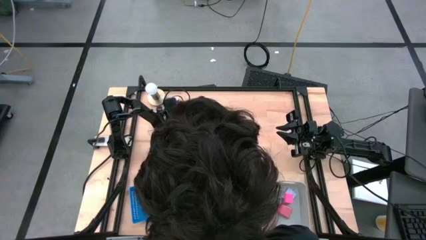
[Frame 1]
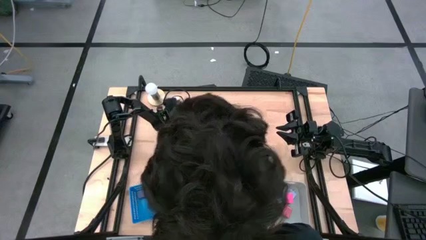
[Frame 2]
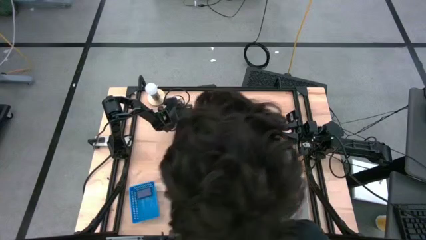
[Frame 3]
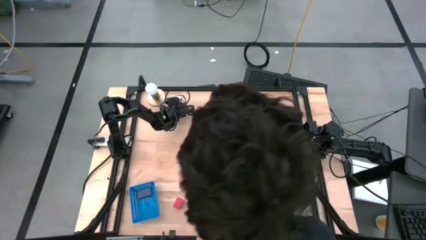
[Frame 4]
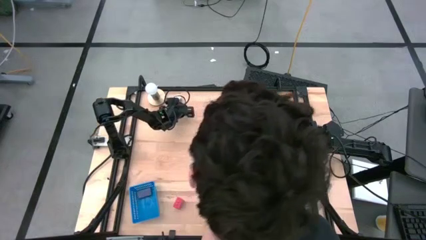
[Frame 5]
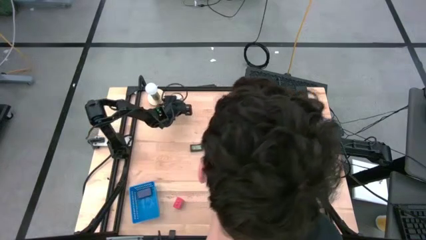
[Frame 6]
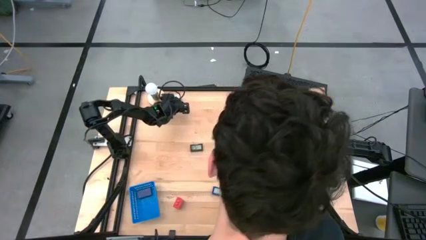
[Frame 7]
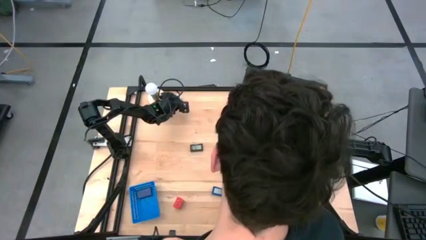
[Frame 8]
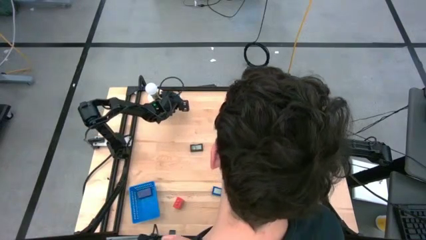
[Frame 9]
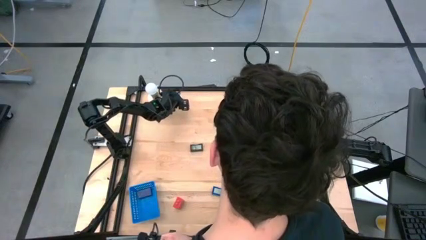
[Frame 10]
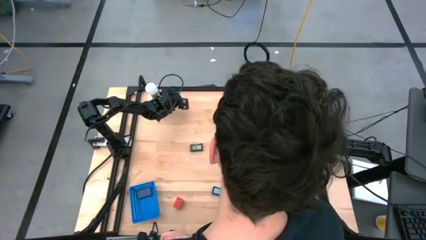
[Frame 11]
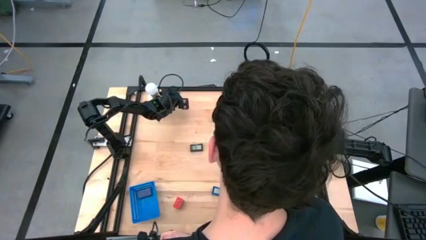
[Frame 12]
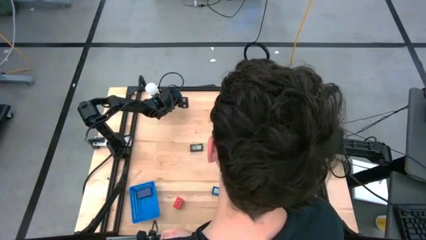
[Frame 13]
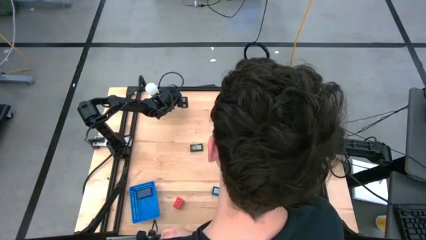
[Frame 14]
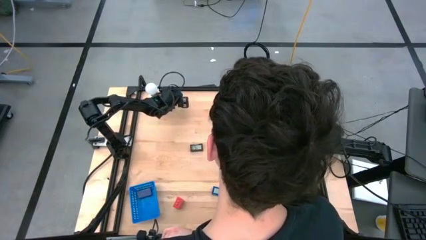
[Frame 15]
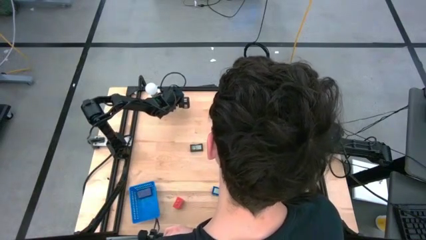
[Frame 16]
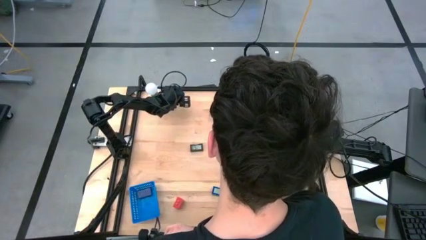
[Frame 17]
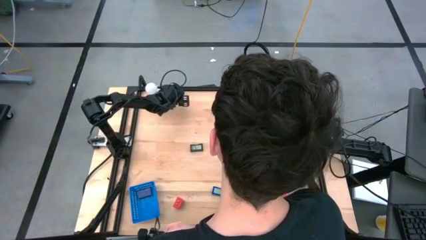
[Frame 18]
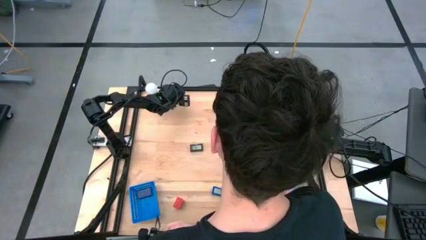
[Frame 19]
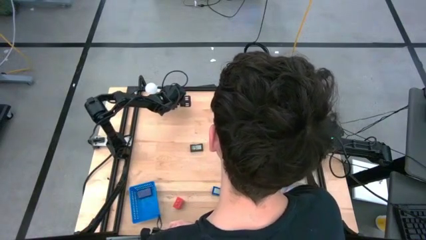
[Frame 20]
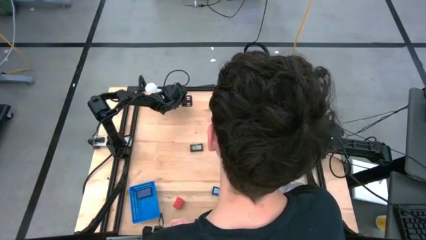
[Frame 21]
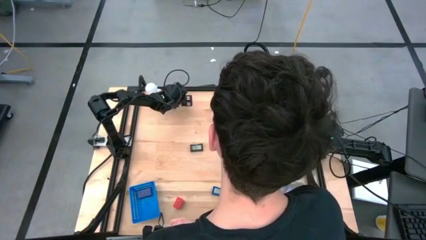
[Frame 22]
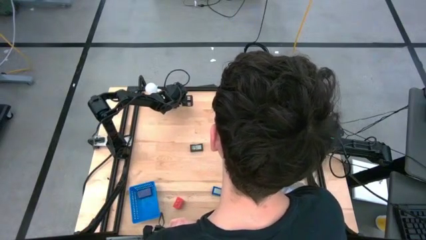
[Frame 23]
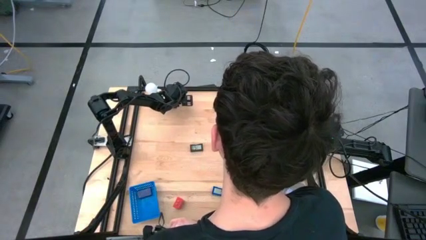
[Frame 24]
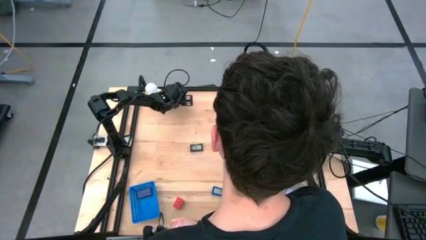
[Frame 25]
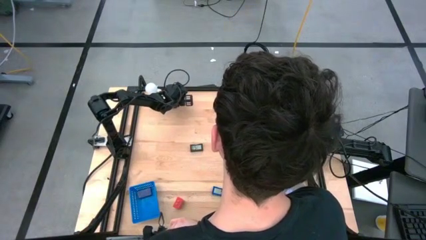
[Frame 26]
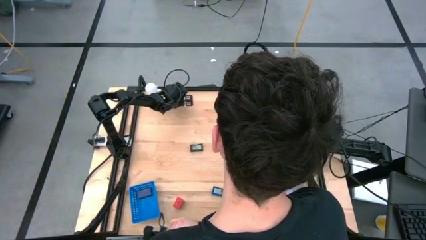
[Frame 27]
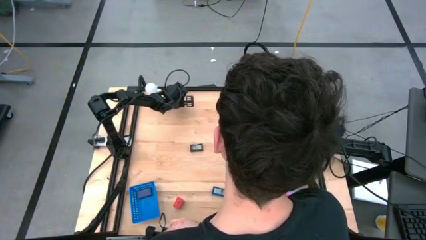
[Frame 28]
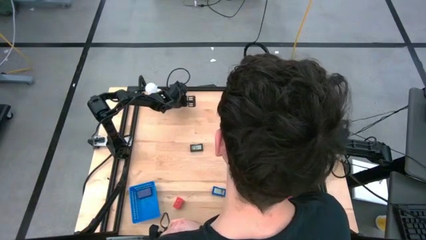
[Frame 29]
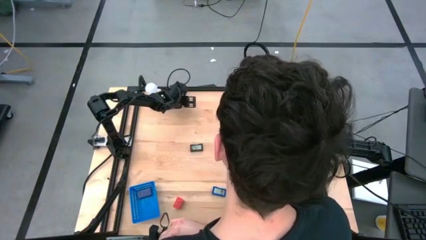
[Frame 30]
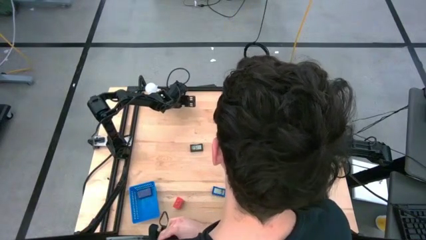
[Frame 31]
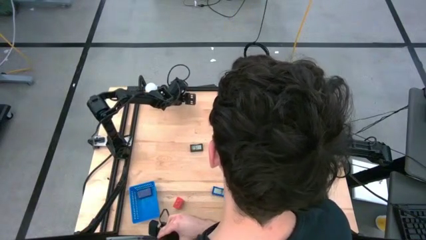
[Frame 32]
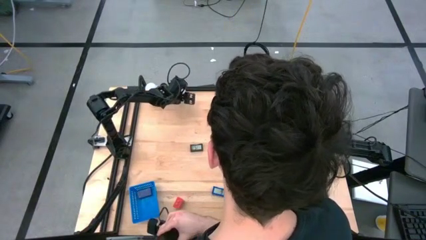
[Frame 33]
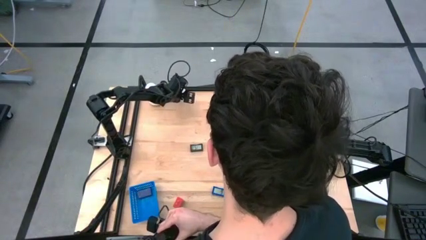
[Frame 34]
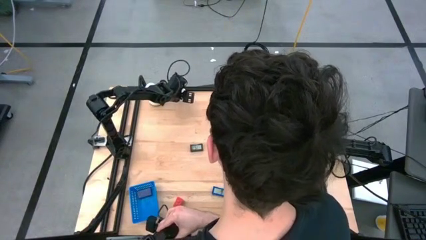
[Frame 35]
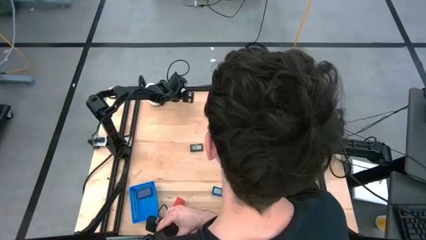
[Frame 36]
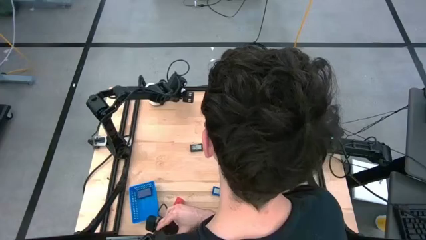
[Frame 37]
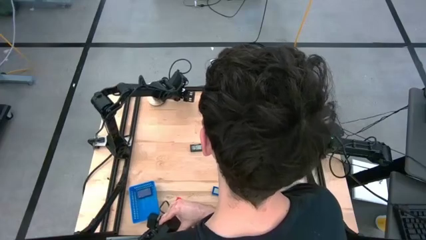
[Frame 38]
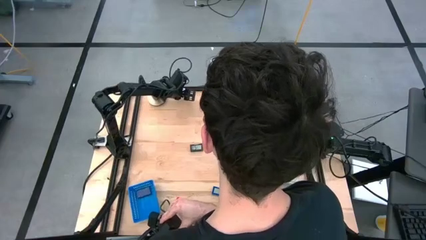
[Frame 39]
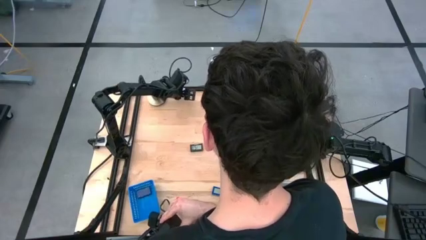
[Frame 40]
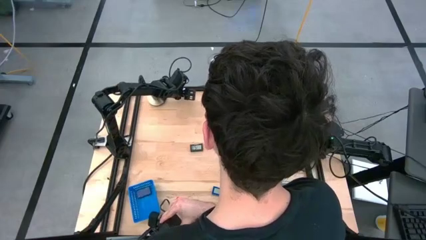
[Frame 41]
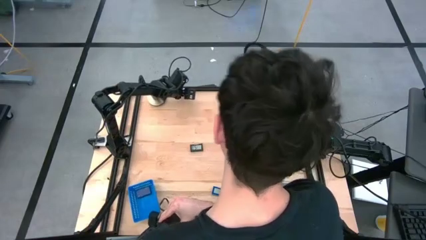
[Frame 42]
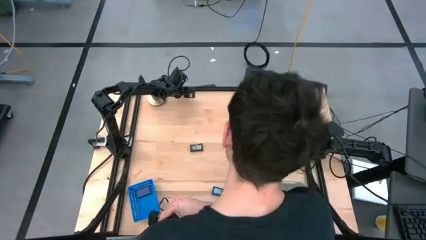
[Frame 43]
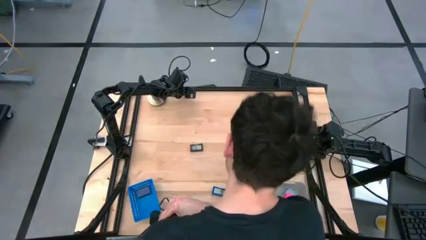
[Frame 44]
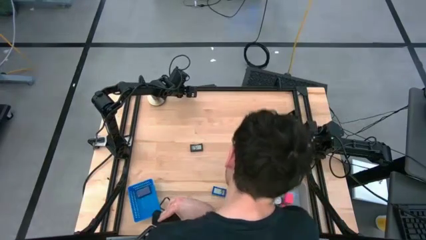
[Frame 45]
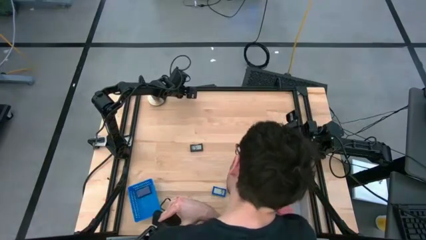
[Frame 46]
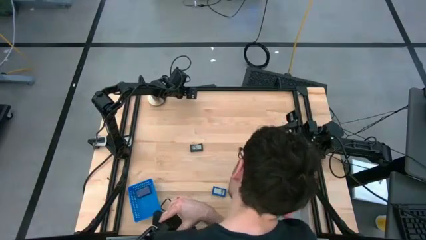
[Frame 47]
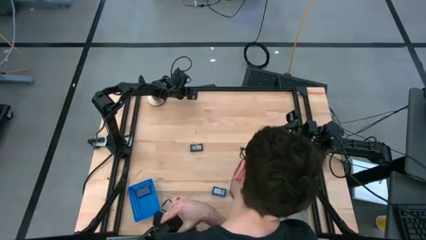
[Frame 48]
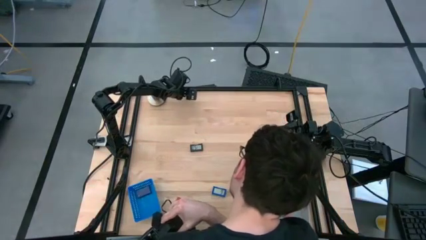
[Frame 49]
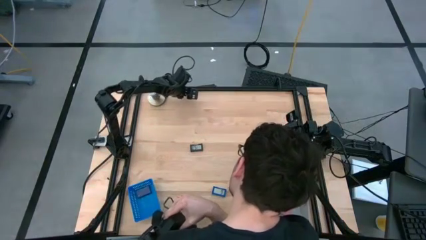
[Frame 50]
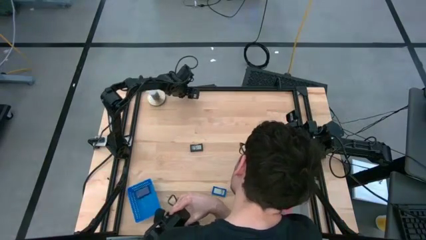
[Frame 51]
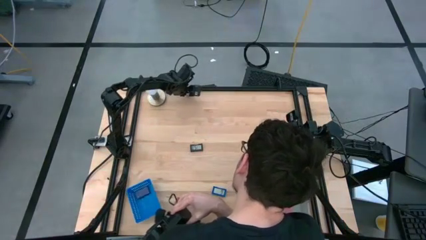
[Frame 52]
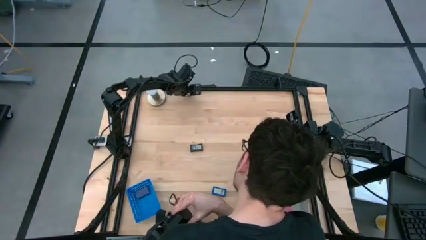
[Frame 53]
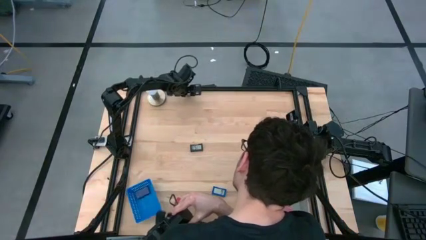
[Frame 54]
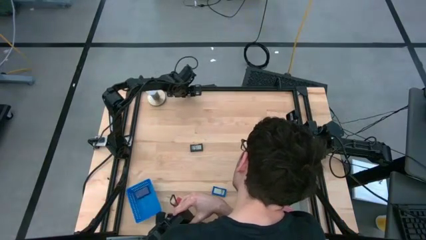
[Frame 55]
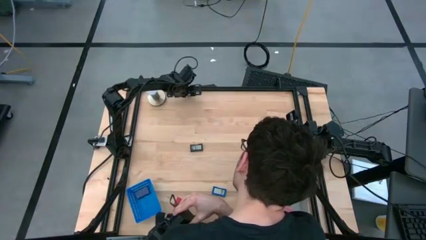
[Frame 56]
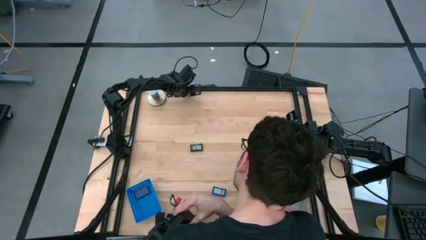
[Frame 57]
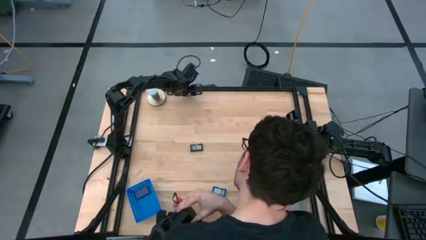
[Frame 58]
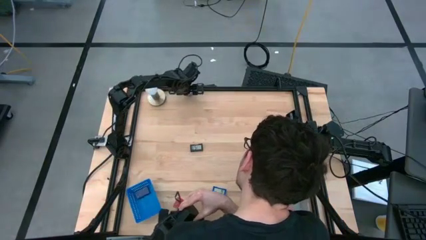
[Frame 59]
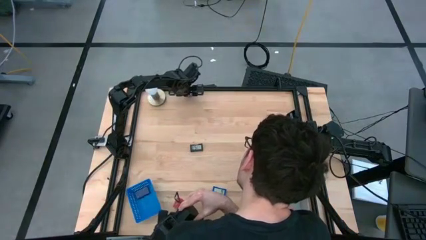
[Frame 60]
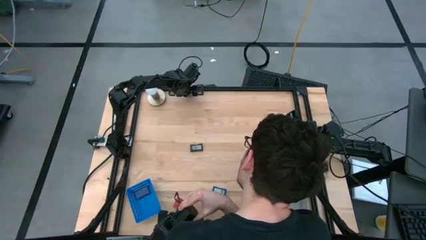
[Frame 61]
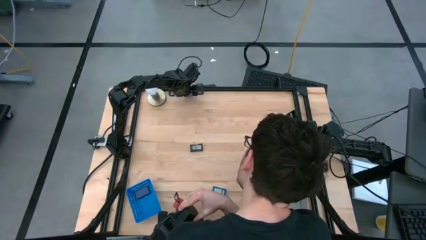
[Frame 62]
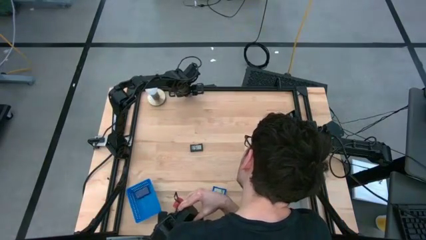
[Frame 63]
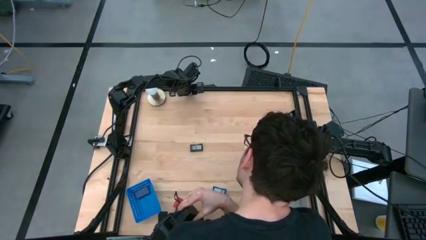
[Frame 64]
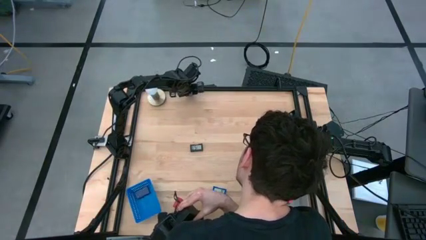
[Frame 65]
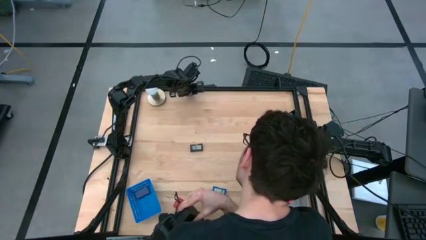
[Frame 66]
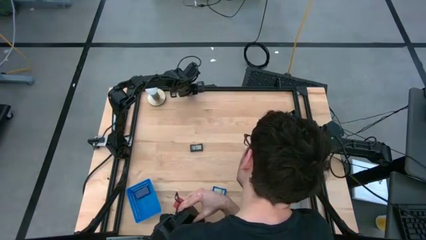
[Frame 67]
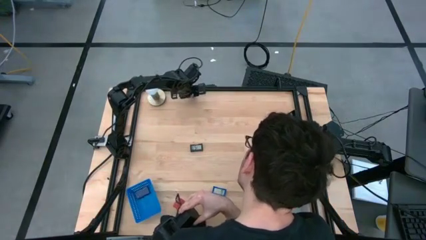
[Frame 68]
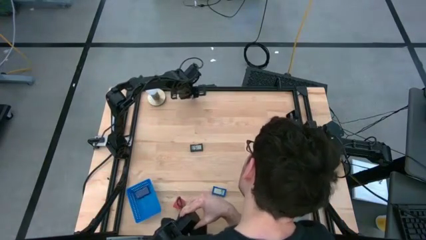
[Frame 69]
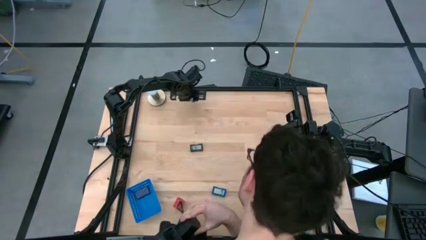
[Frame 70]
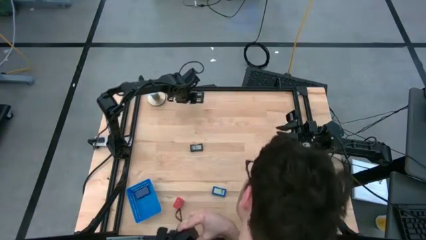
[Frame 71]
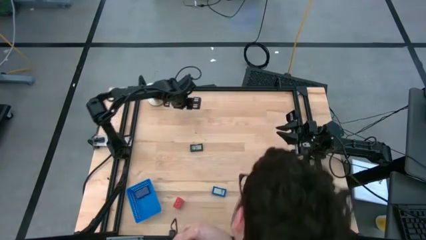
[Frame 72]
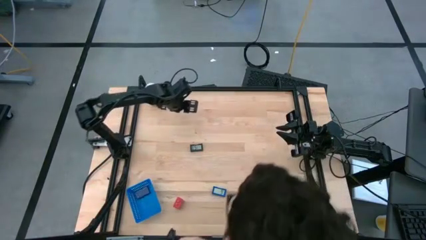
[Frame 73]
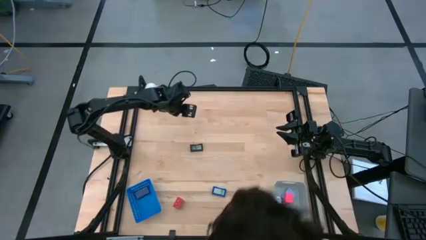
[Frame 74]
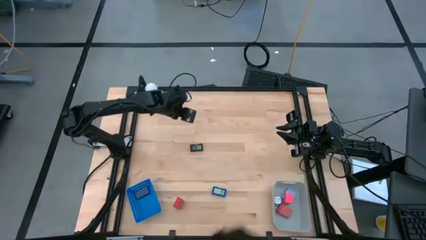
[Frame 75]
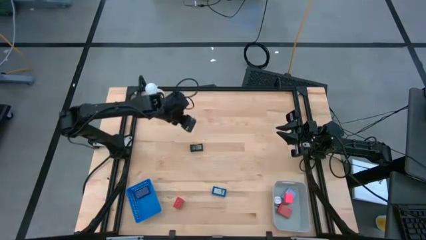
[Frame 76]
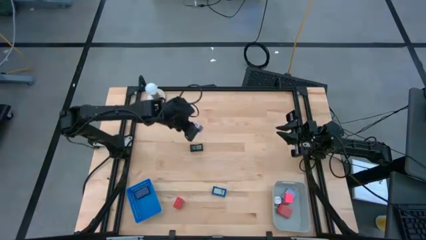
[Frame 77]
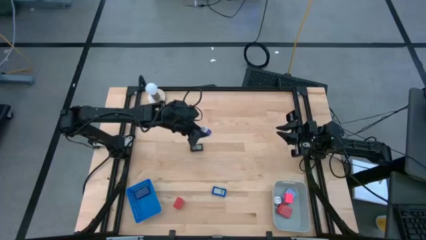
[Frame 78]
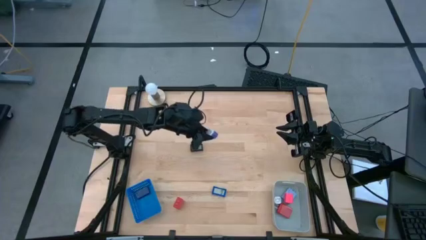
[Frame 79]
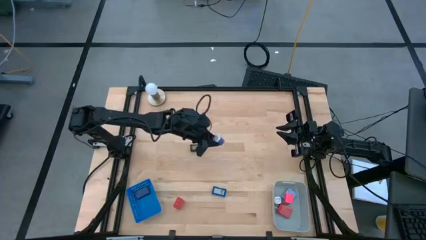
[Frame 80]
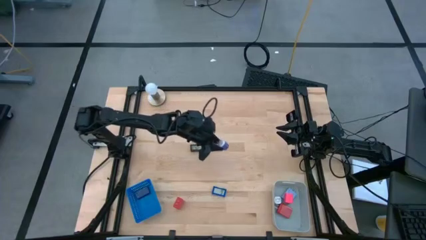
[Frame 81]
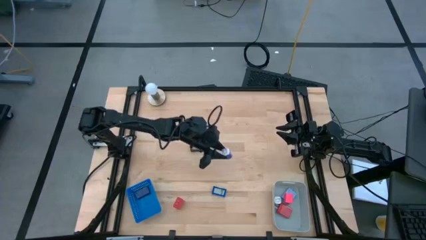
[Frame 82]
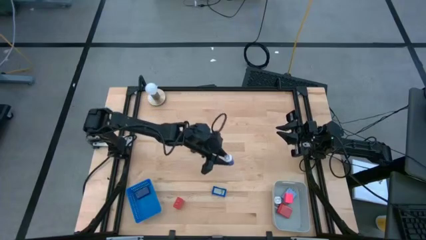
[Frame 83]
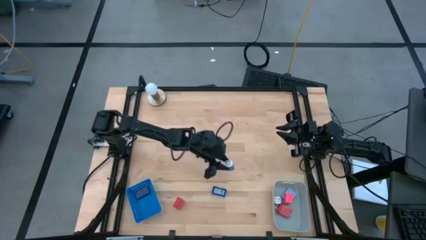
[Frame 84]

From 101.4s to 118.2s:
Task: Pick & Place Office items
Put the purple charger adapter into the gray bin
